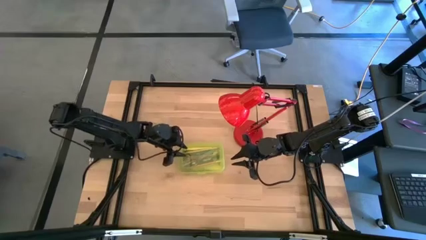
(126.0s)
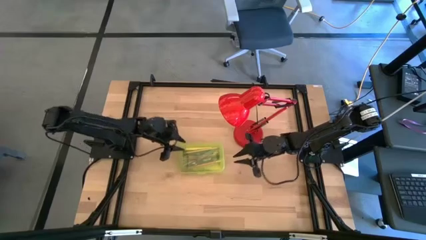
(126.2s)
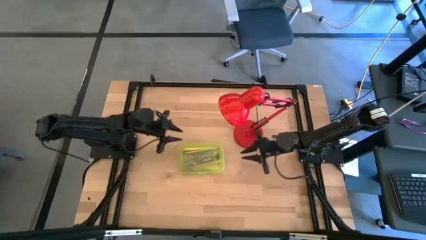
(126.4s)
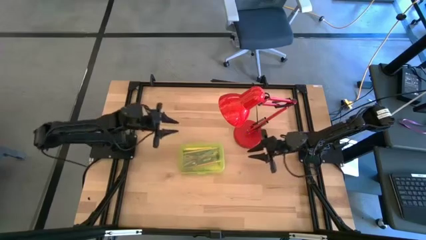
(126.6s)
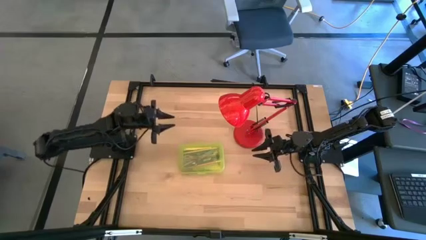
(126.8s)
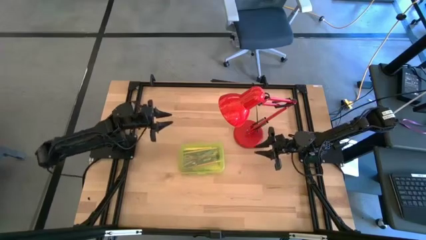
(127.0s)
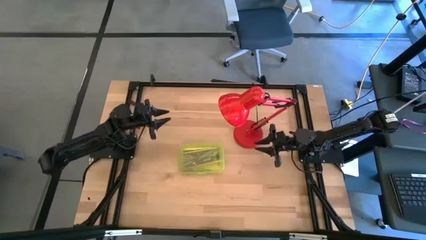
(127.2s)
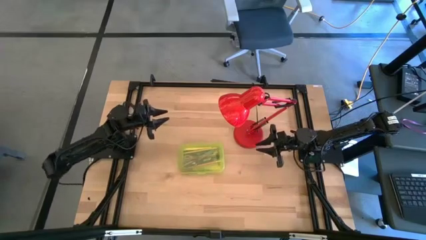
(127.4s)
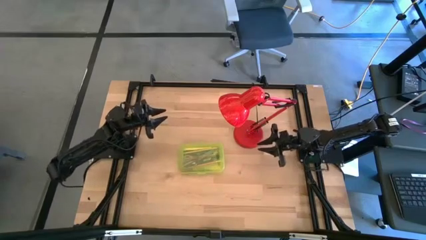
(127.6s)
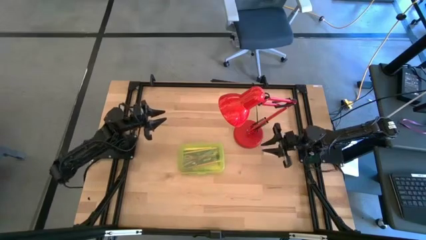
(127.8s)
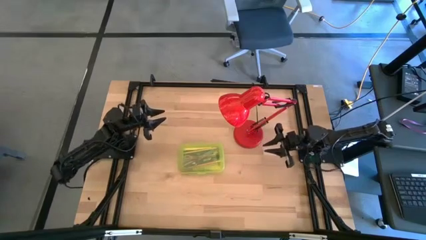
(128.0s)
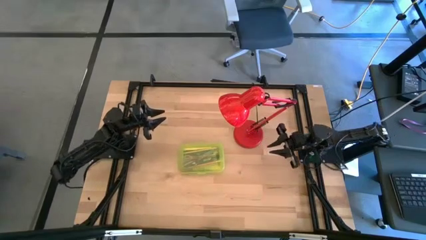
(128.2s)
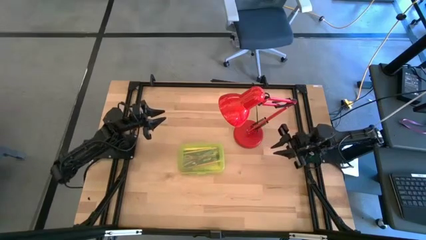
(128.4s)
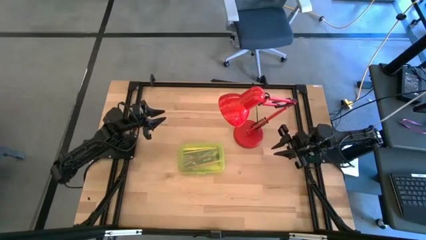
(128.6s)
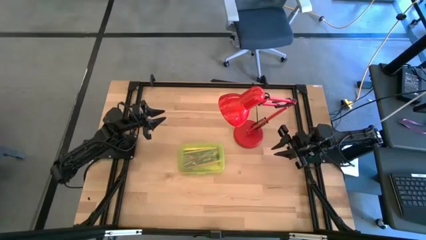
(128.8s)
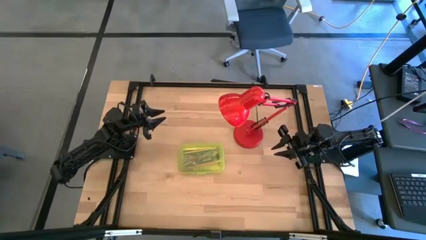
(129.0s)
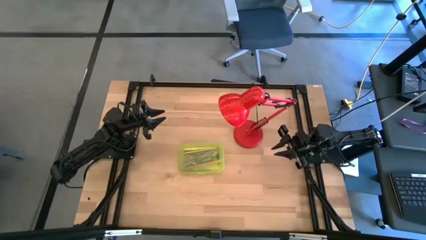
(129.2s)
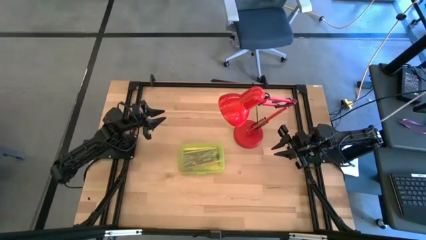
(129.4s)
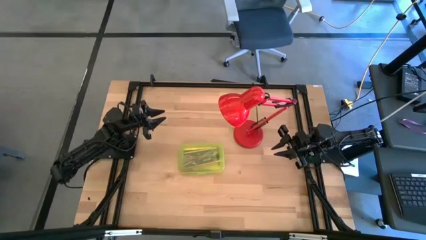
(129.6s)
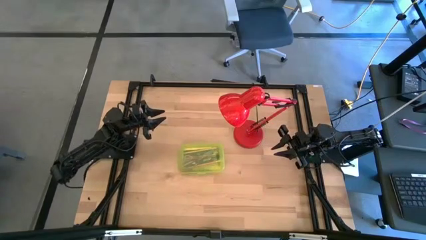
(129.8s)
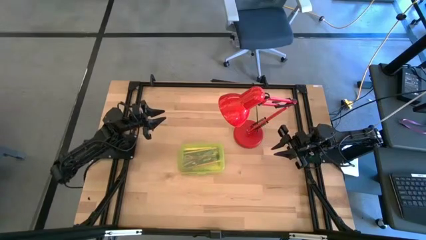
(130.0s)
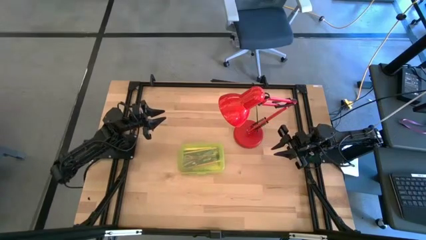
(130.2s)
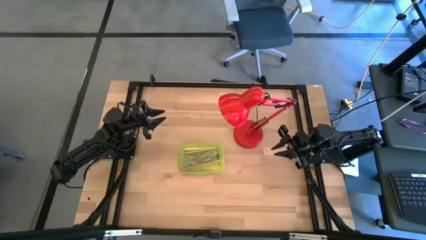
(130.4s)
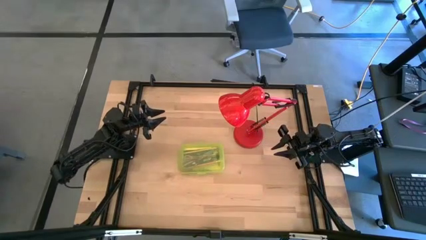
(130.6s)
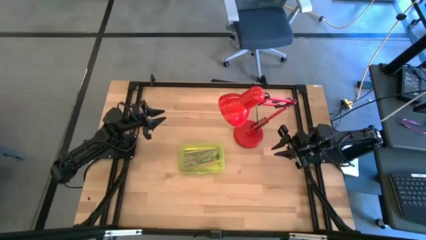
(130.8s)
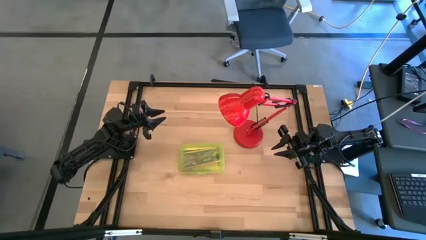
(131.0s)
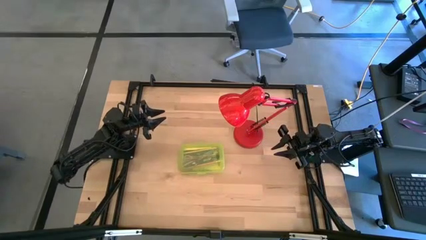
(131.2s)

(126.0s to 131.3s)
Task: Pick & place school supplies into a supply box
Return to Home Position

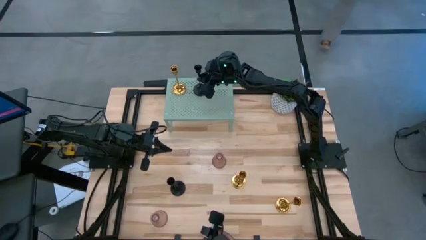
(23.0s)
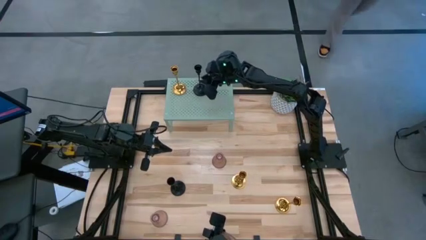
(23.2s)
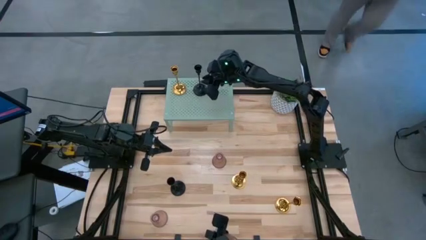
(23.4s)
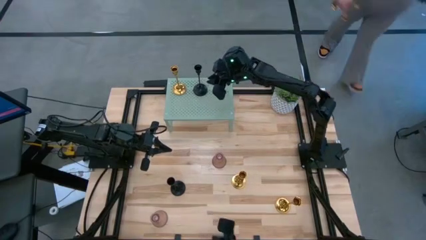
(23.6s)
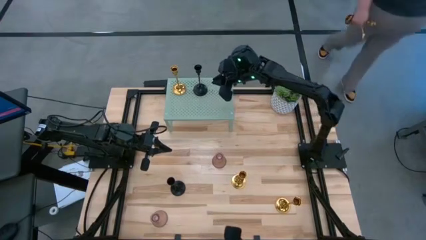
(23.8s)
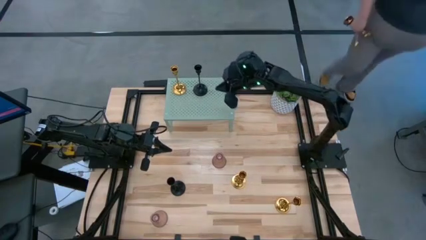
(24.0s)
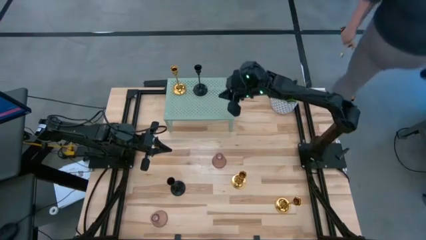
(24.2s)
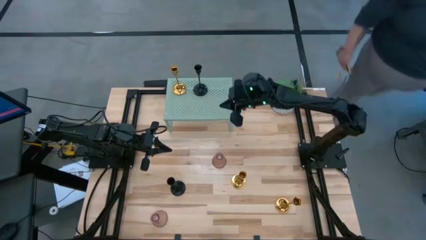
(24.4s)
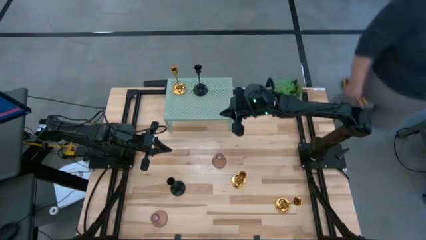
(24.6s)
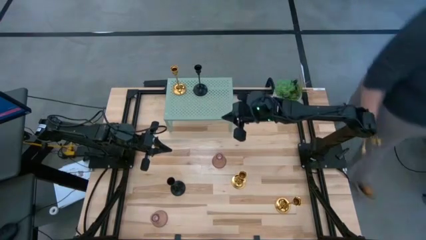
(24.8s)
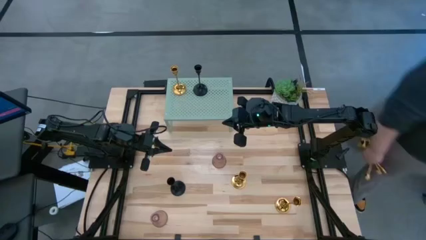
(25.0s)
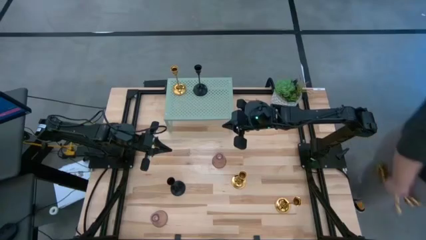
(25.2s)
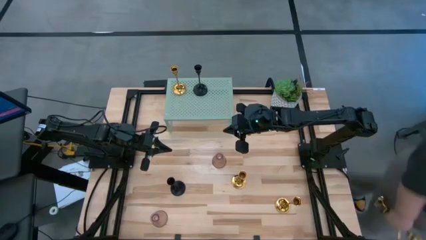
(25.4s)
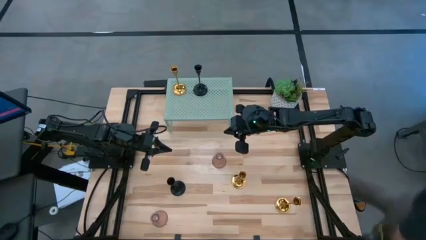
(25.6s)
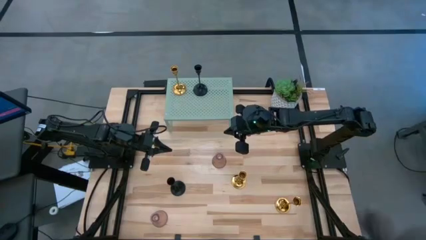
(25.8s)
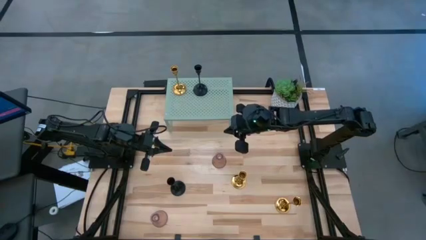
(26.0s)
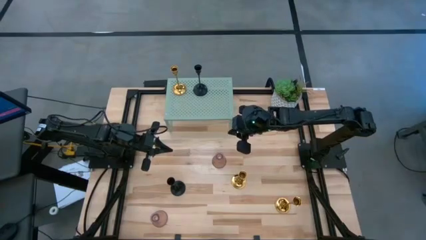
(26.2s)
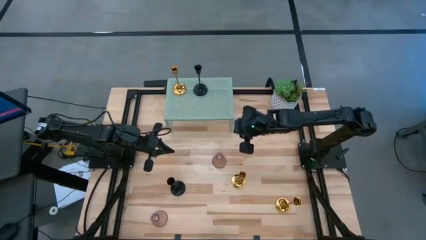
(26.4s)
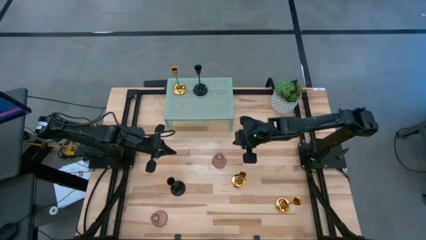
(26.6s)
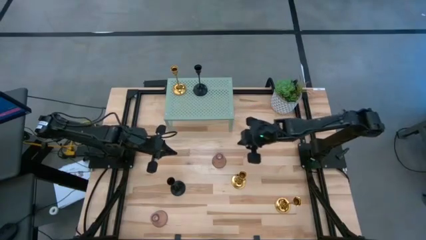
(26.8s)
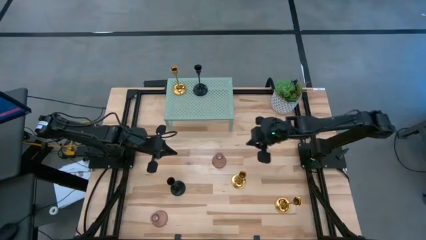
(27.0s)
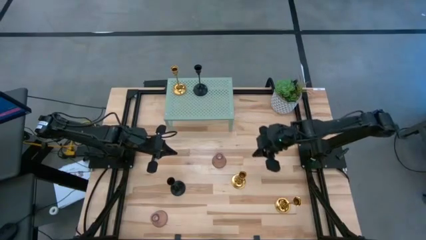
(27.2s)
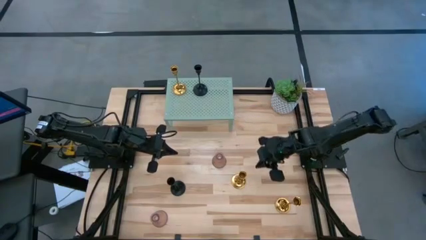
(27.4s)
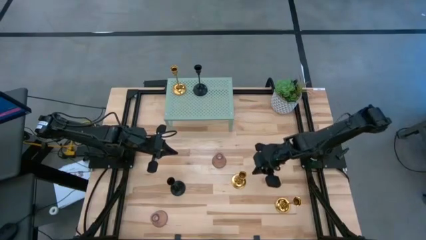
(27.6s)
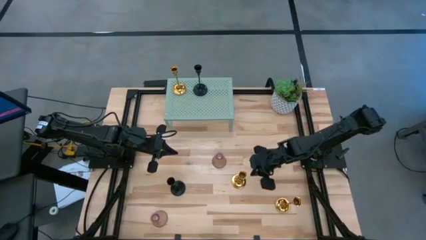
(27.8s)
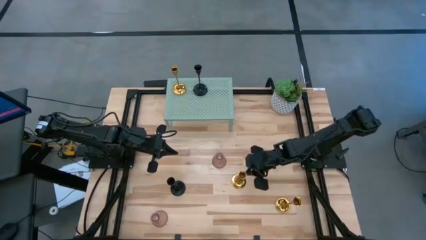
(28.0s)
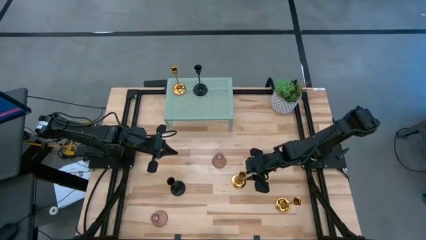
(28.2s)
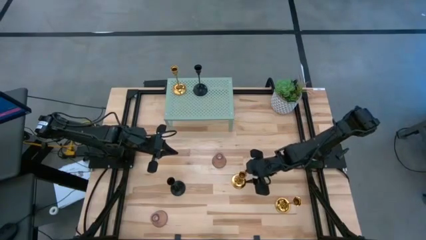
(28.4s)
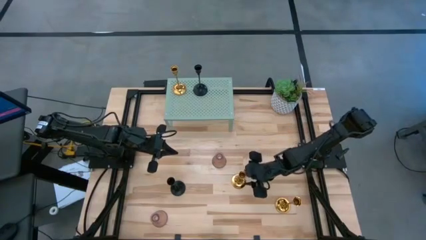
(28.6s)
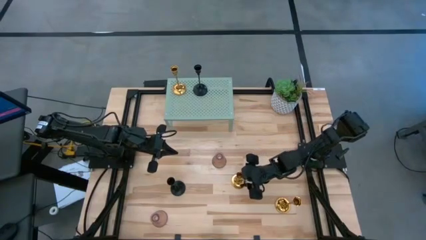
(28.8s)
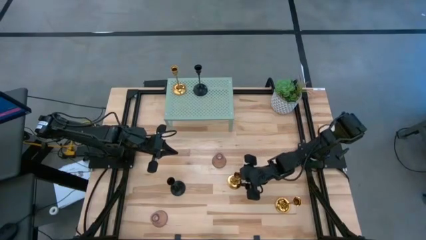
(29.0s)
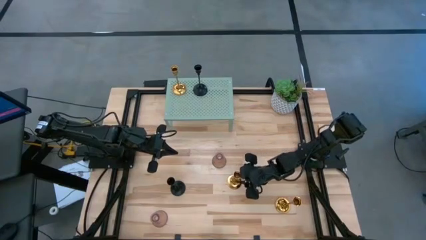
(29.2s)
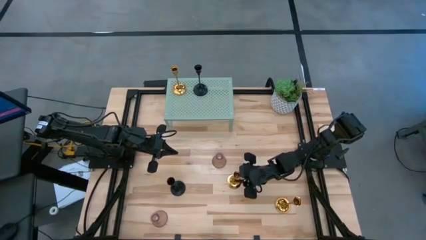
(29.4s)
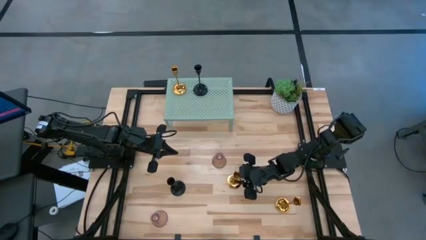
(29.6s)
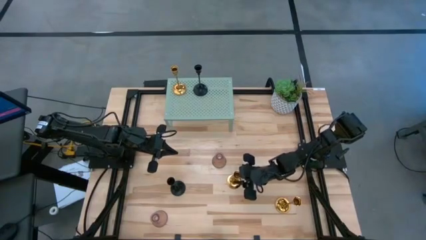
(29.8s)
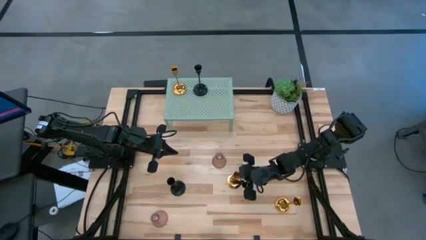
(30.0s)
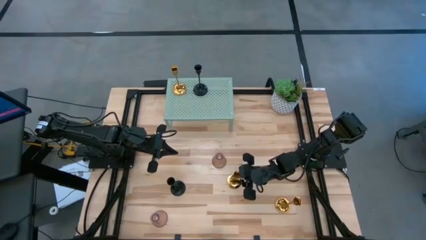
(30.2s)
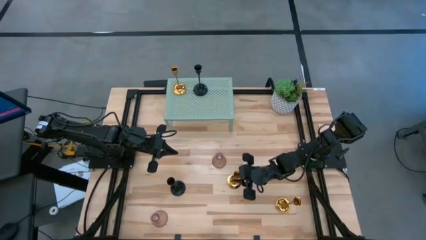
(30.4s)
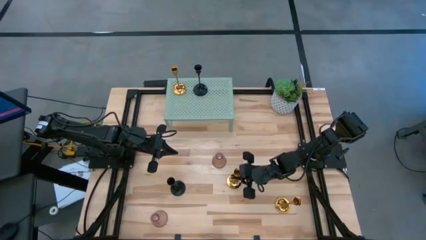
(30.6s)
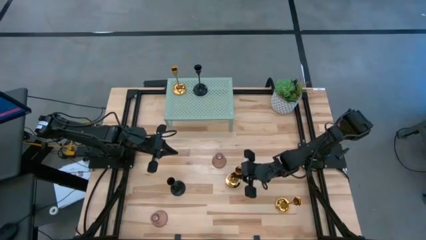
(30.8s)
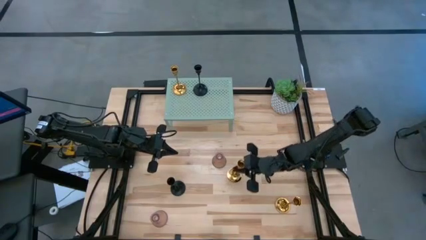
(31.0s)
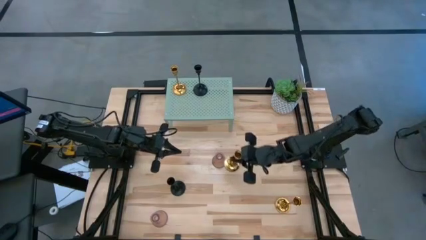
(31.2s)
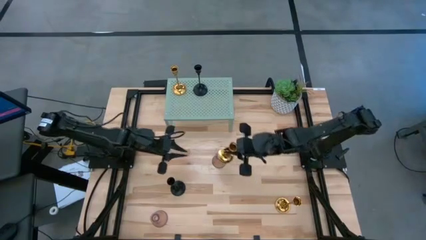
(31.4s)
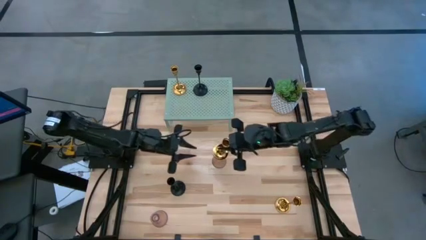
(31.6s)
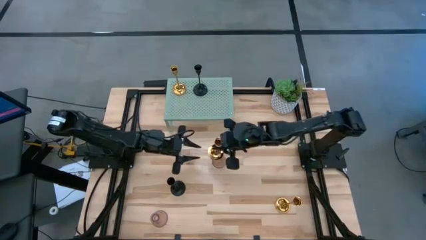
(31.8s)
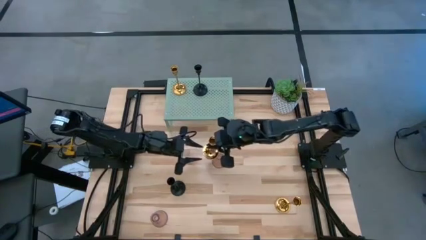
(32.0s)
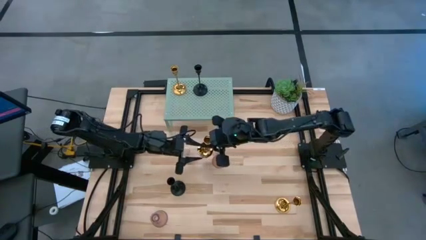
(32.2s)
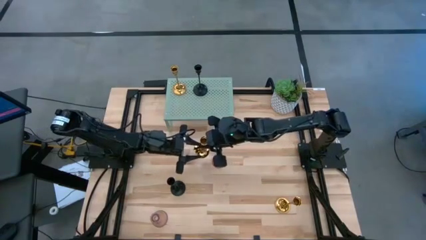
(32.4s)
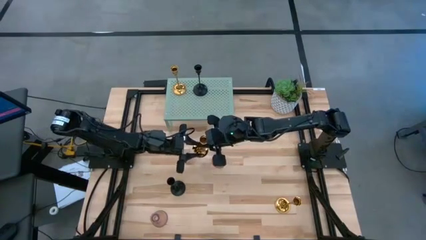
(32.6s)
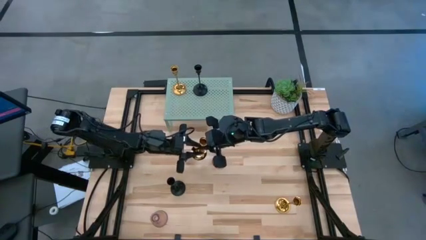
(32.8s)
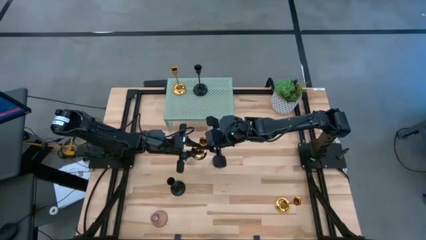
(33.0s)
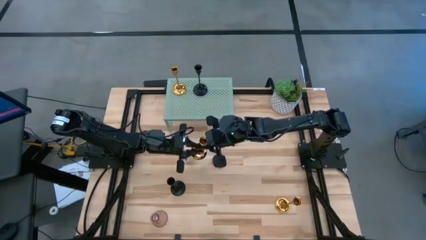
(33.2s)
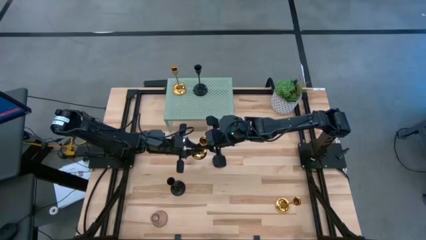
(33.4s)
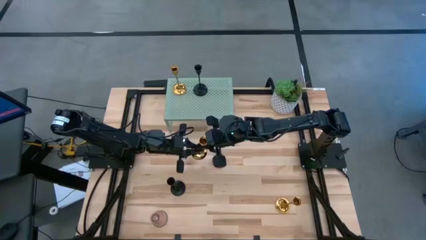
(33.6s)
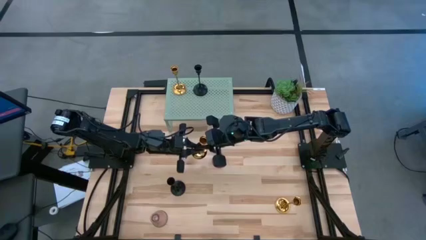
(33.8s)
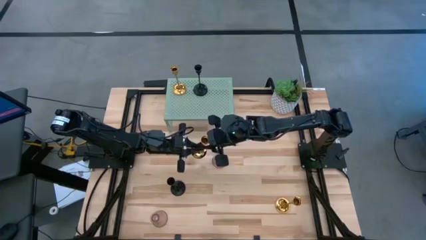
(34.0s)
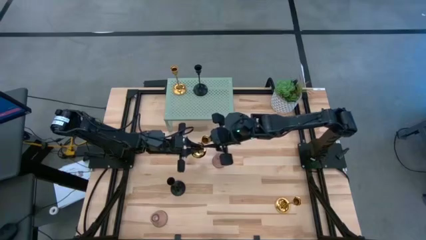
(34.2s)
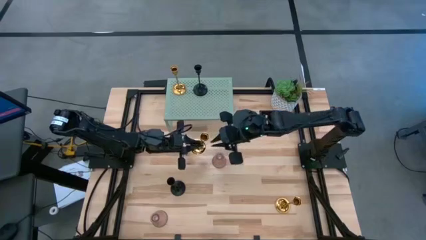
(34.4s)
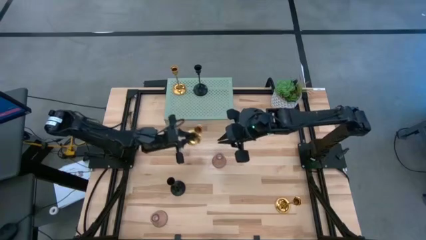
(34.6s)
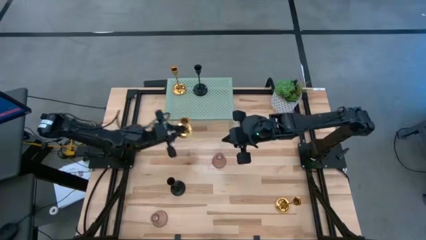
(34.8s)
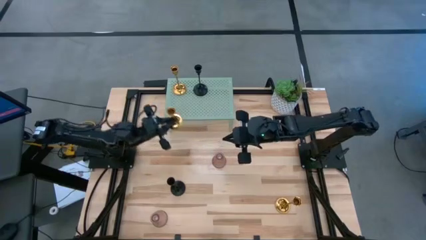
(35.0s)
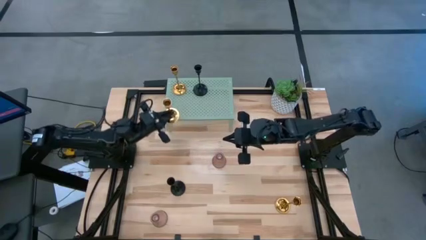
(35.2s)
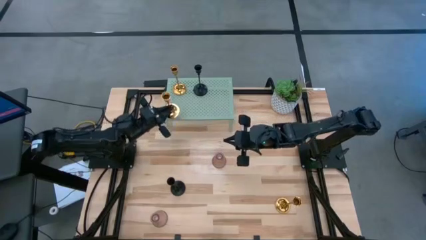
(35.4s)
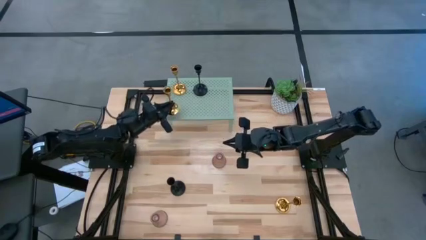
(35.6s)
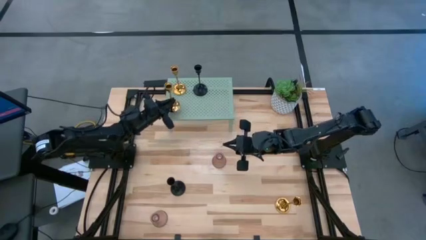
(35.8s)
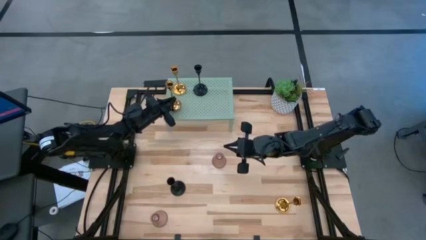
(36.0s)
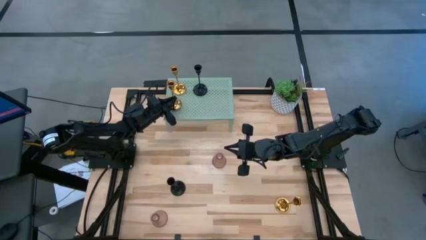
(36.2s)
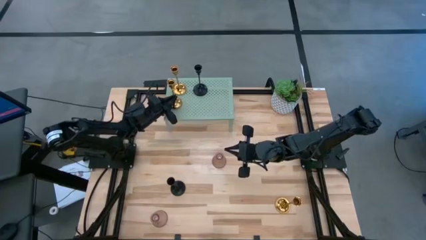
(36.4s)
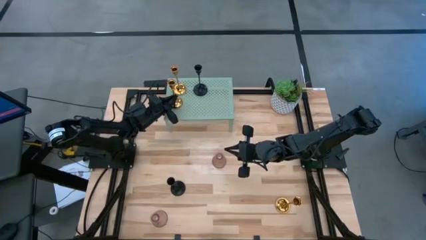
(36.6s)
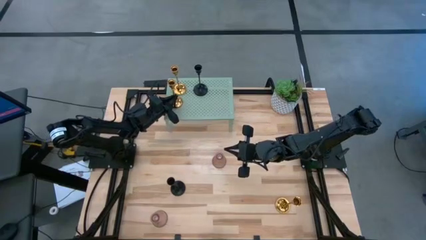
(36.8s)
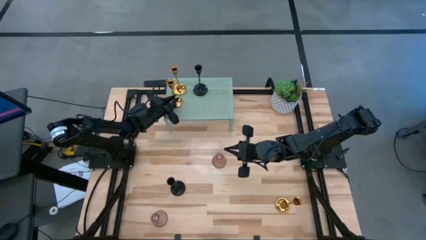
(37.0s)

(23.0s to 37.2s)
Task: Pick & Place candle stick holders
Put the top gold candle holder on the shelf aligned with the other gold candle holder
